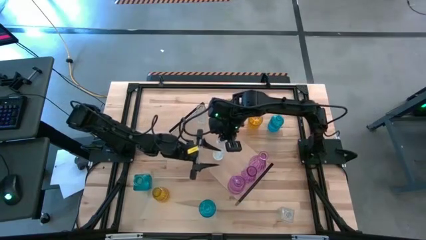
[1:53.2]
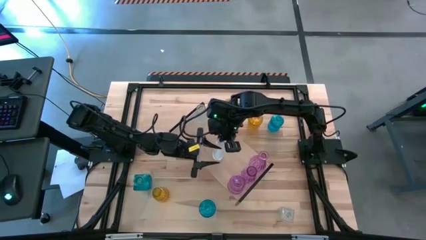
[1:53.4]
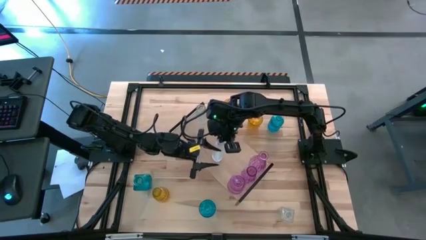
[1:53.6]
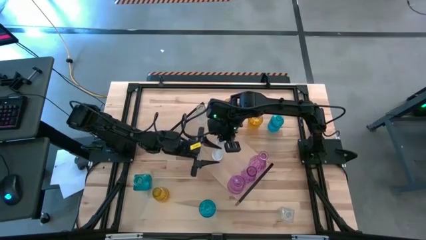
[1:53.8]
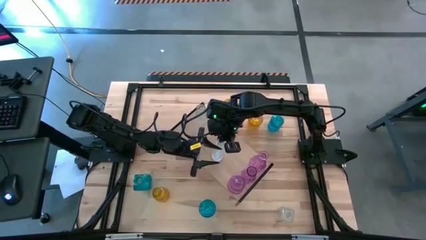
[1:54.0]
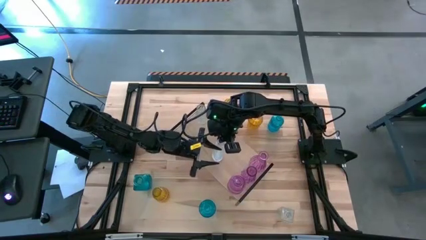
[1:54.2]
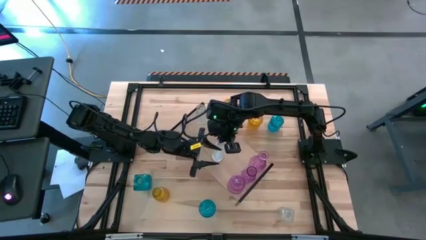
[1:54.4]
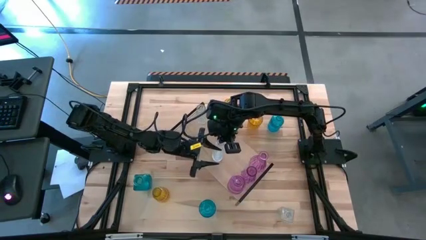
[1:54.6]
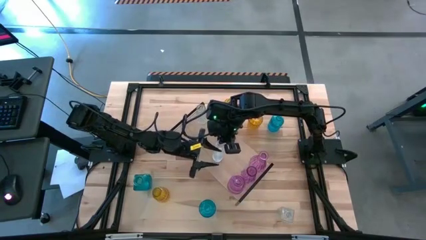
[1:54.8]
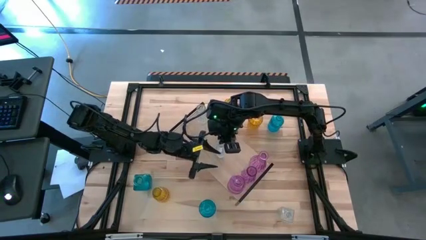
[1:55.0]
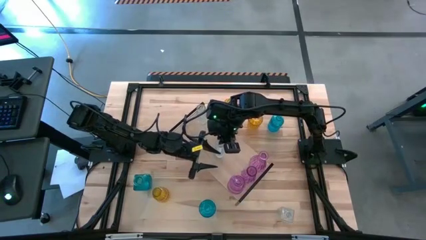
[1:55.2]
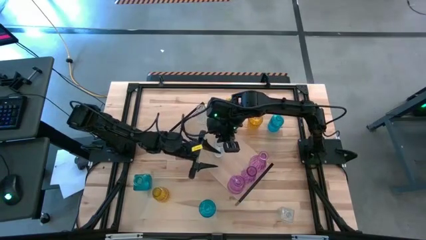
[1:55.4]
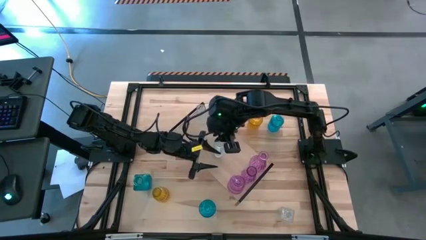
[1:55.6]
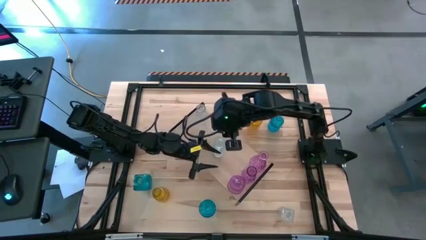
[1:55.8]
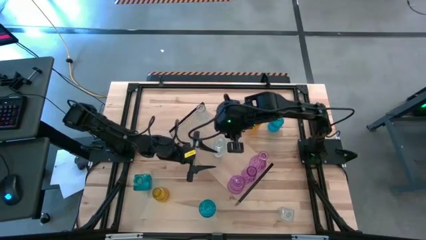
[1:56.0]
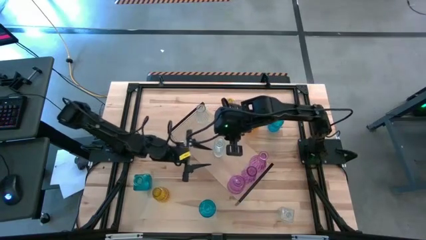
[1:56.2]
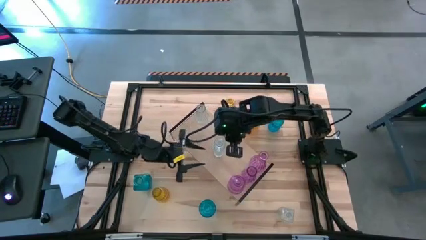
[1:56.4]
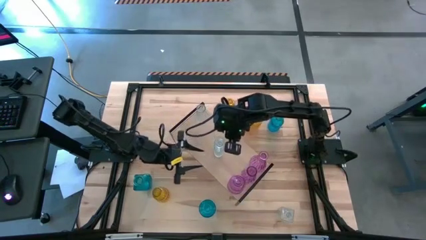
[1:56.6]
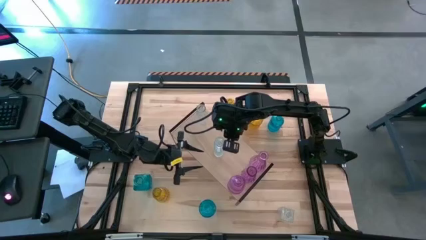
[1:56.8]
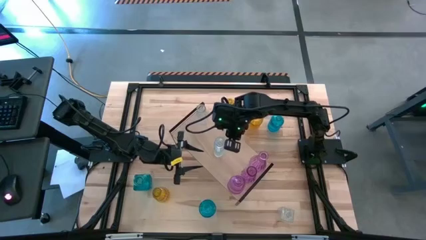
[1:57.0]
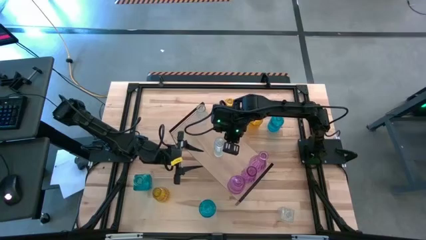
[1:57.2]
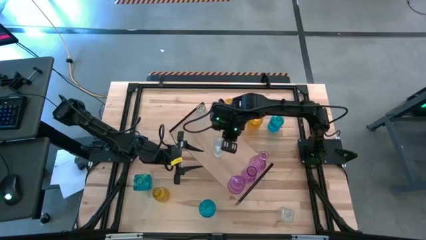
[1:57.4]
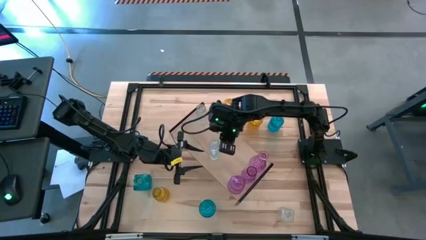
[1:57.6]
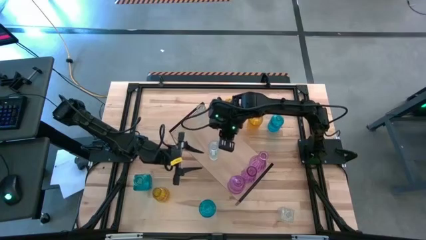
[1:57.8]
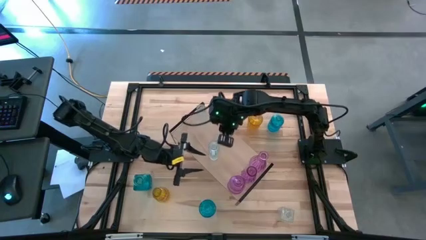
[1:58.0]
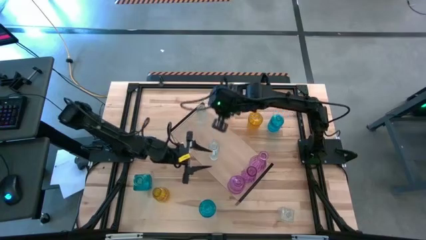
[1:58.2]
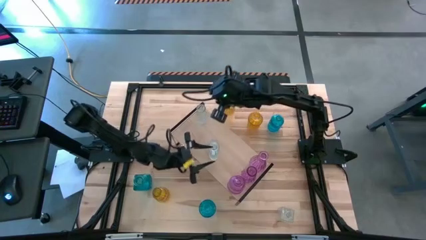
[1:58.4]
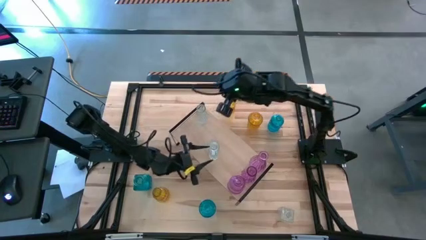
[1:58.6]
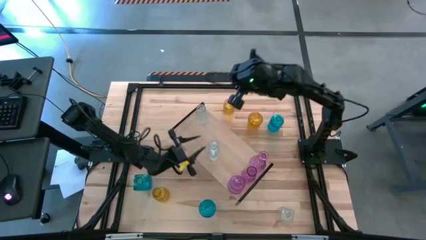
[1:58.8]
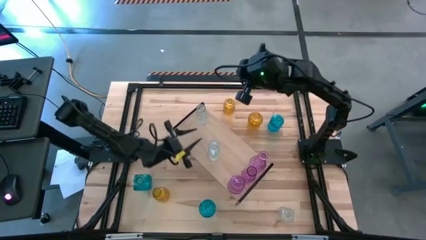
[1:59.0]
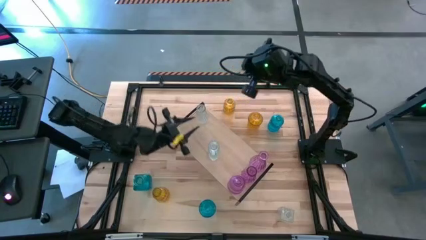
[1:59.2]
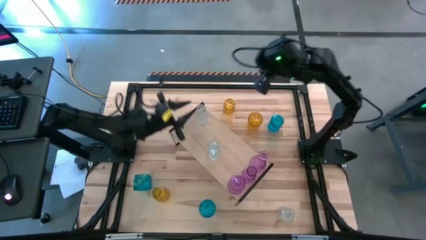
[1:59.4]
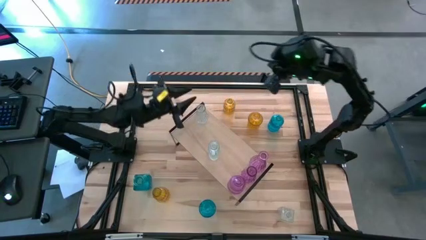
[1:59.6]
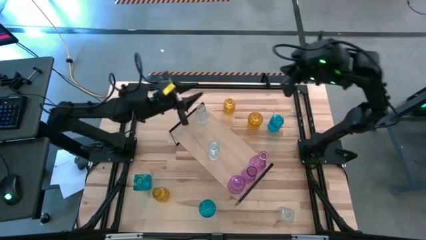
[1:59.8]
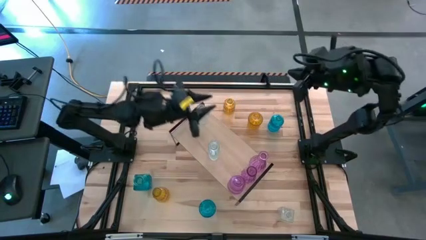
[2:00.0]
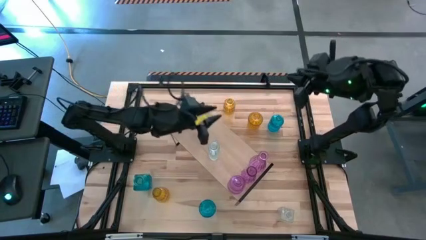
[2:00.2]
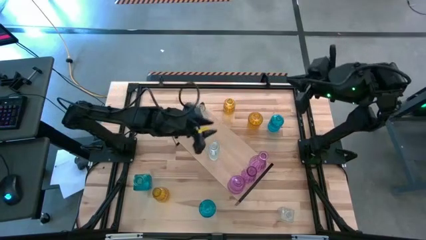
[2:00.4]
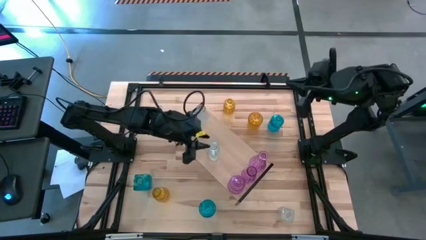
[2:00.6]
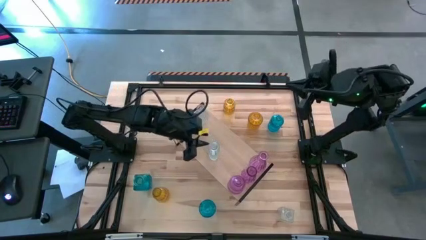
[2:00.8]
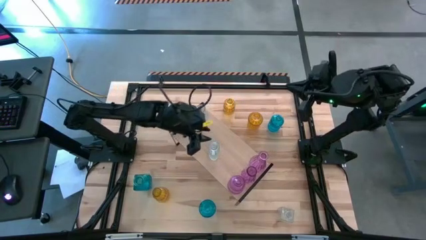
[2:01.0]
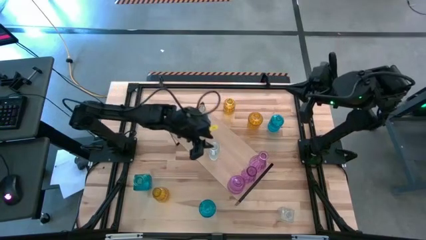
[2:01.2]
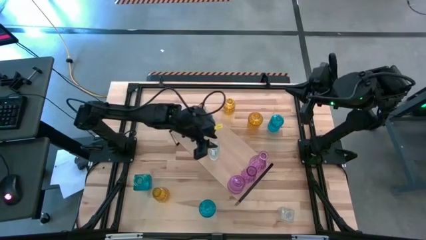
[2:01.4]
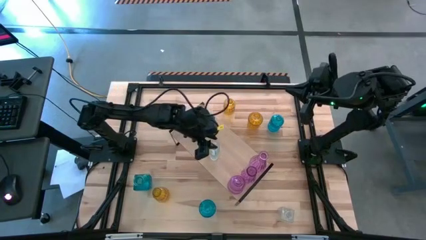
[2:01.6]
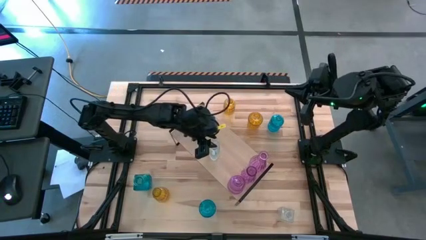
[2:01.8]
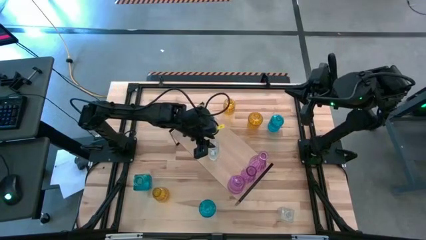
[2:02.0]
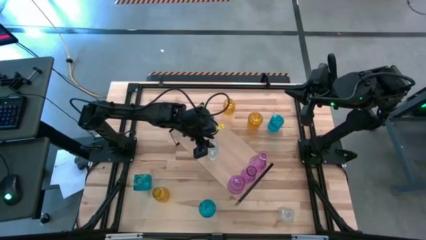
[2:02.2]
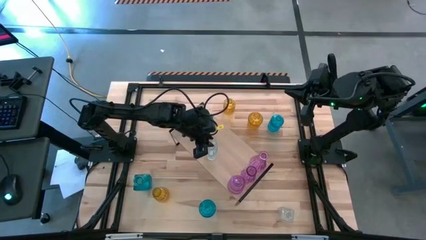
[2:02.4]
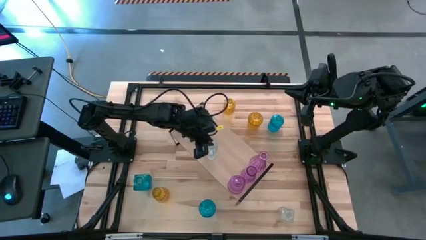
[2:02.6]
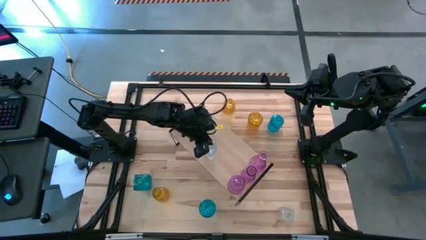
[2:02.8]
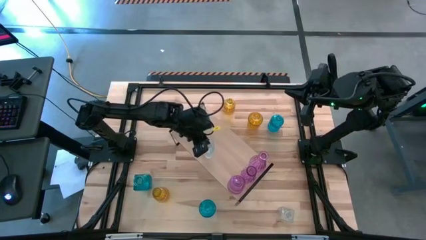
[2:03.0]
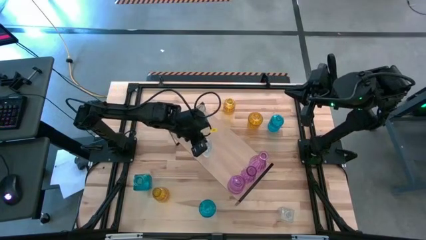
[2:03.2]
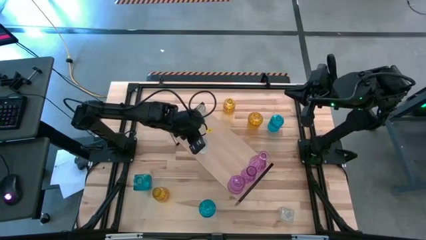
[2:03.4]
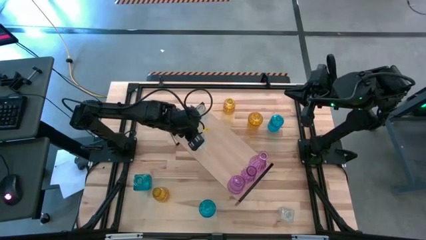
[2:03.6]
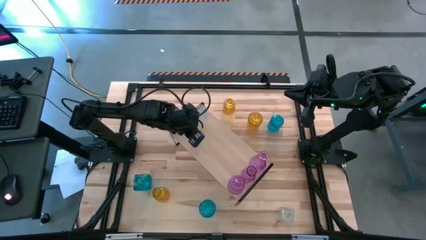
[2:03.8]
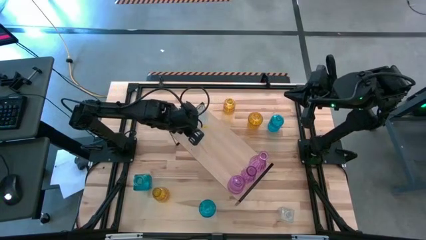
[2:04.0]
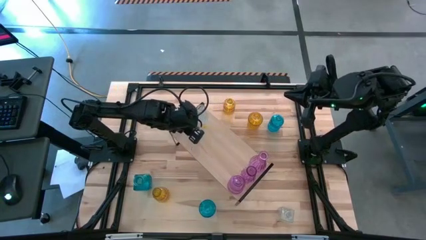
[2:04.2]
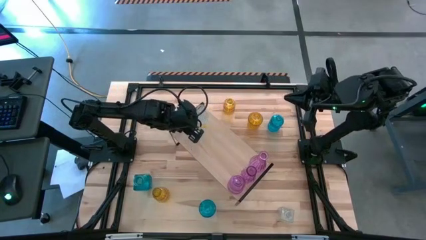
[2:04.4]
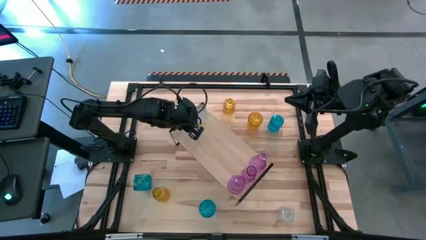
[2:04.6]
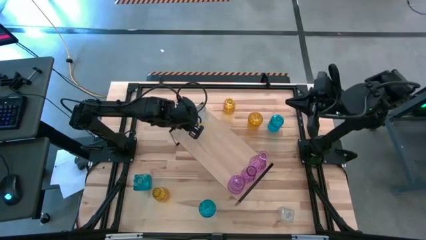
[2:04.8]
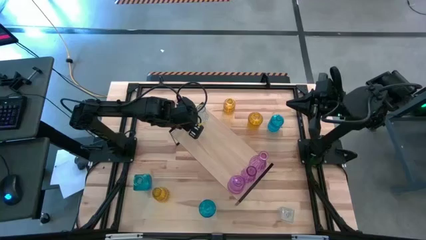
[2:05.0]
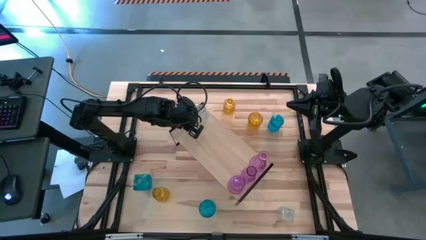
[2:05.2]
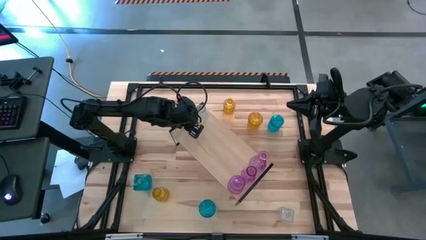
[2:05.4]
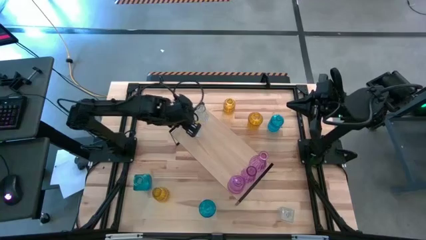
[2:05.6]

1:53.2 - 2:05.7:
Task: sort vases onto shelf
Put the top transparent flower vase on the shelf aligned with the other transparent flower vase

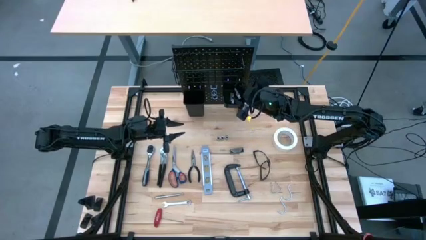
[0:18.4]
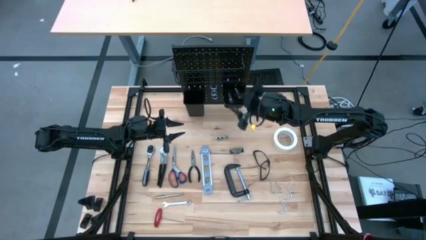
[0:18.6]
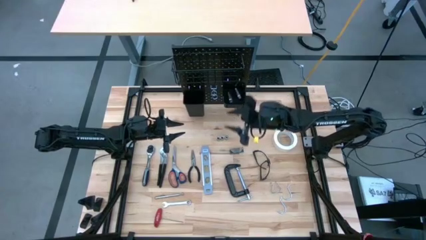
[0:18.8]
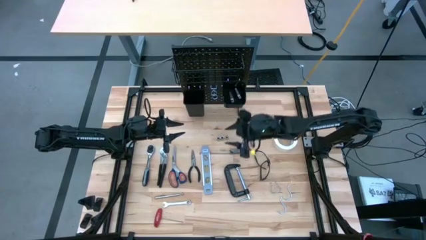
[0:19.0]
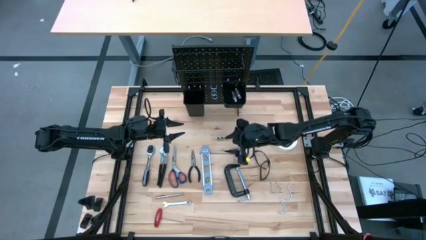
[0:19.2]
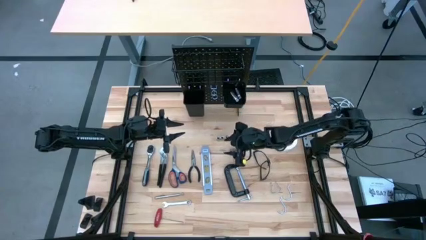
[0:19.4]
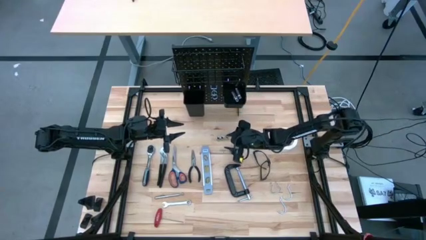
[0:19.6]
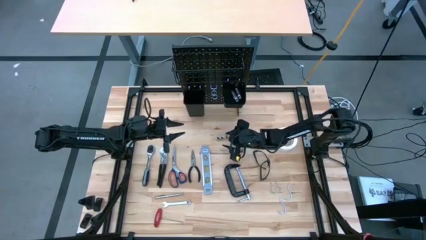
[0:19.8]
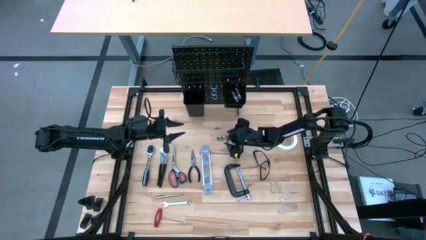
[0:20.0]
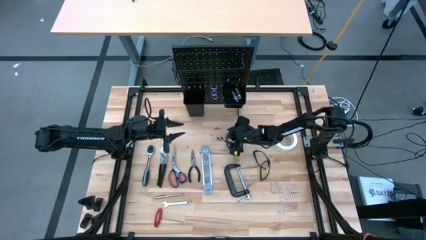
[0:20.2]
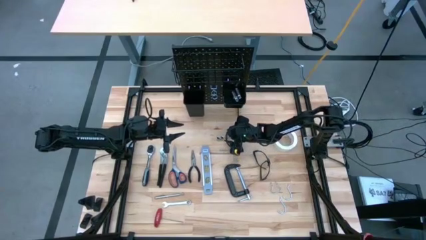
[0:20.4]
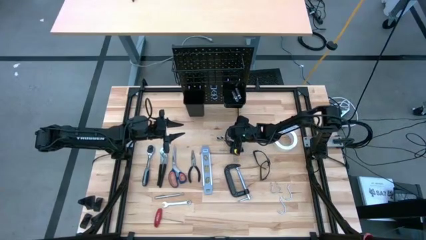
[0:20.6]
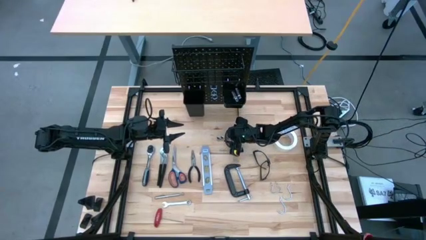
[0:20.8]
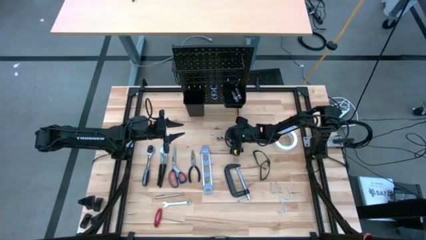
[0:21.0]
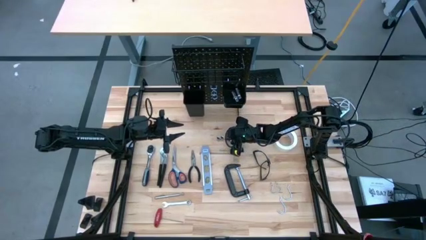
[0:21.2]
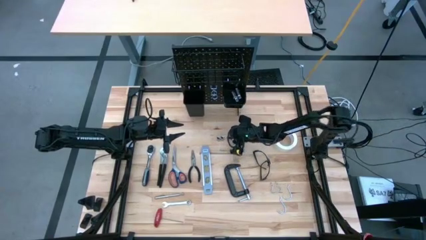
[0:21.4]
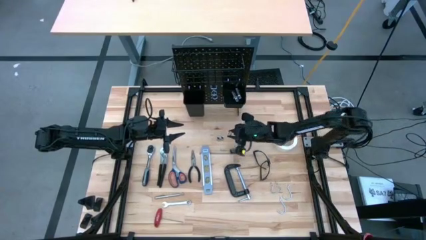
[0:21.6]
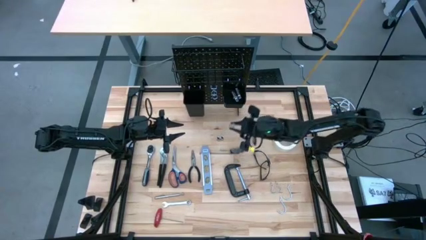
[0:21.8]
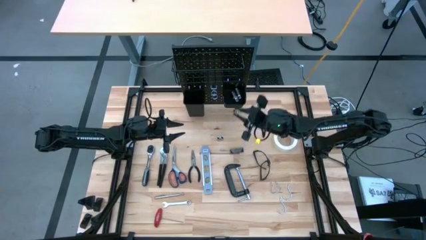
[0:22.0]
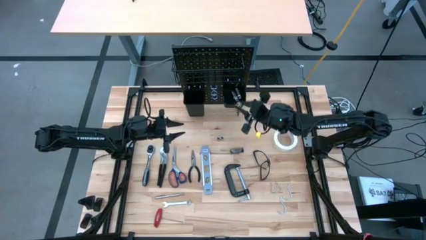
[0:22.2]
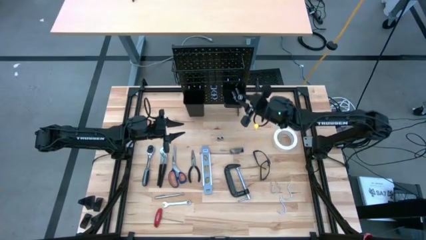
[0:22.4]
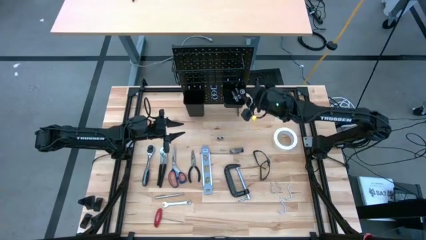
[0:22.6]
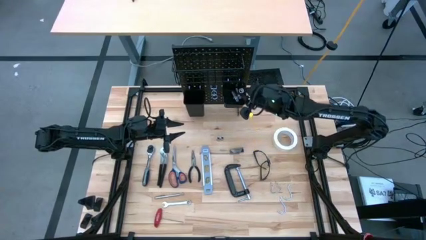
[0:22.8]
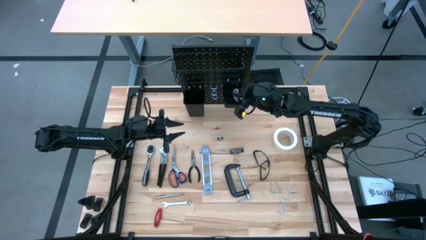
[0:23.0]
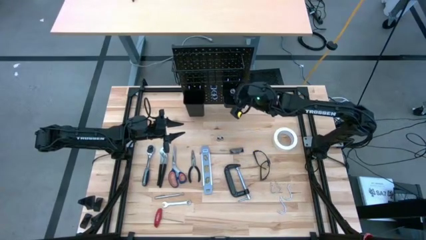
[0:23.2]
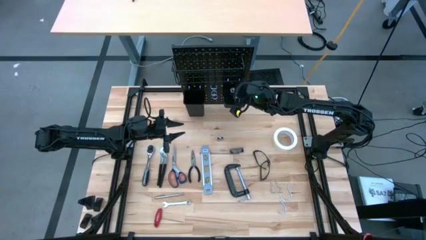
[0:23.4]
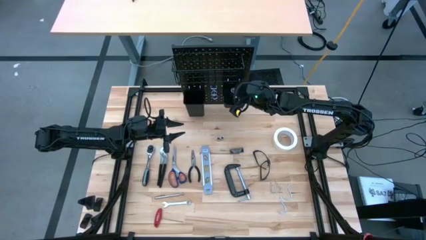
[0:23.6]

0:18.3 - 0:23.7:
Task: Hang tools onto peg board
Put the right small socket into the right black bin on the peg board
